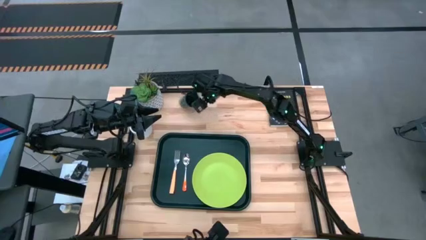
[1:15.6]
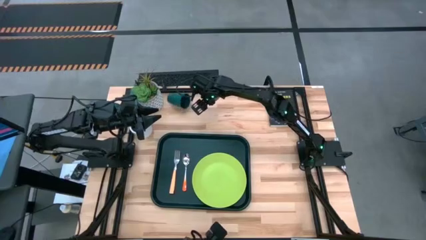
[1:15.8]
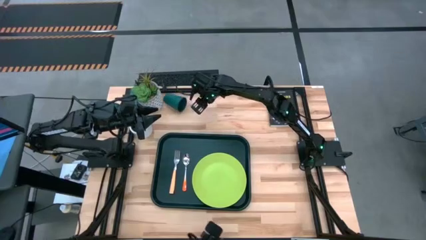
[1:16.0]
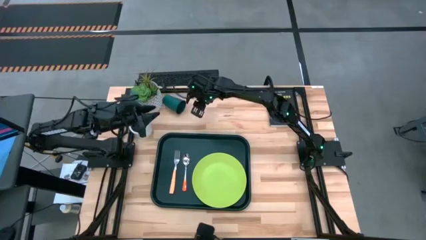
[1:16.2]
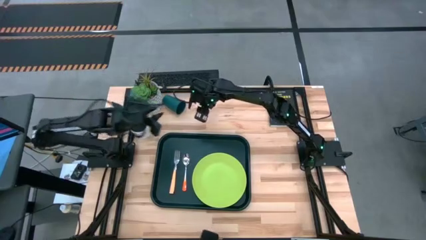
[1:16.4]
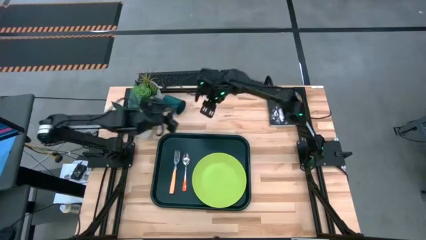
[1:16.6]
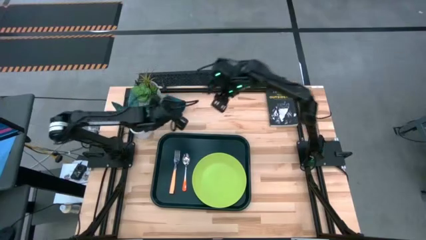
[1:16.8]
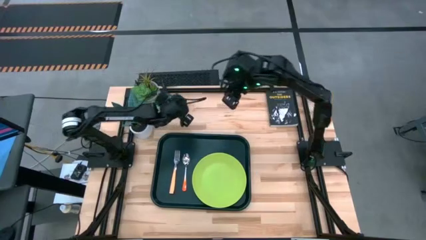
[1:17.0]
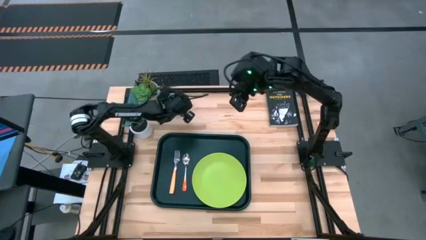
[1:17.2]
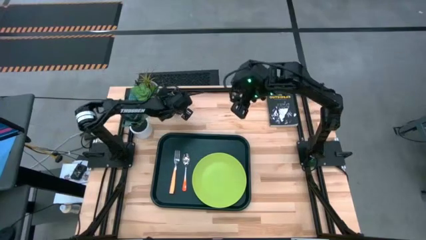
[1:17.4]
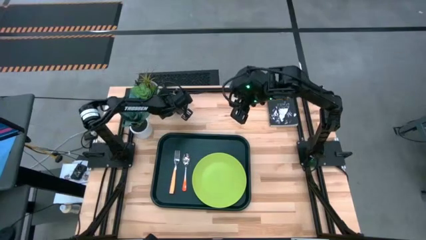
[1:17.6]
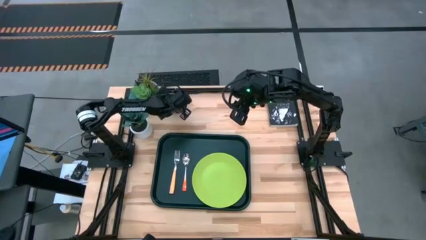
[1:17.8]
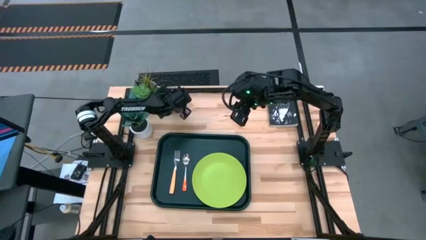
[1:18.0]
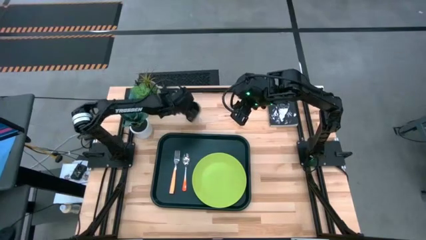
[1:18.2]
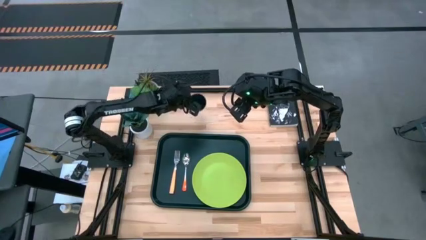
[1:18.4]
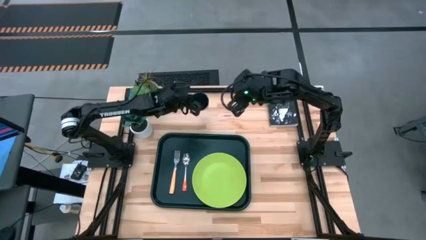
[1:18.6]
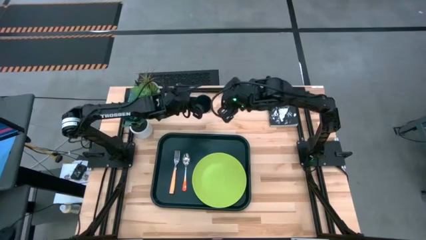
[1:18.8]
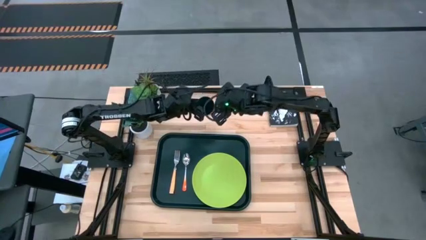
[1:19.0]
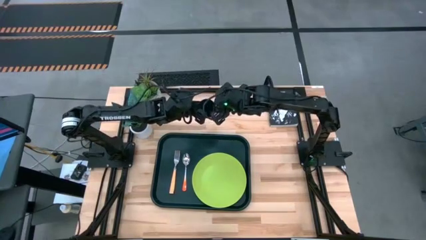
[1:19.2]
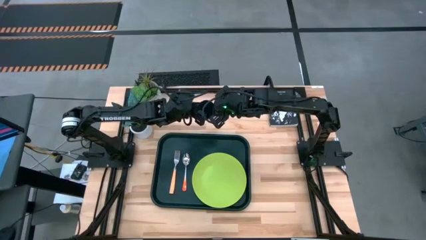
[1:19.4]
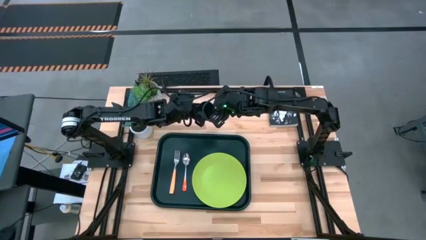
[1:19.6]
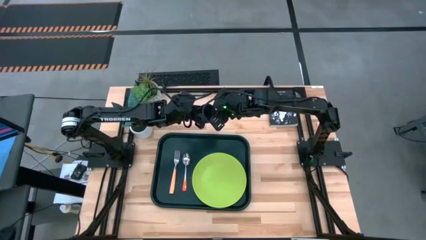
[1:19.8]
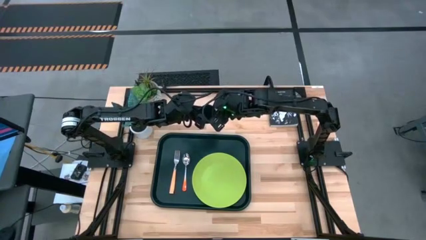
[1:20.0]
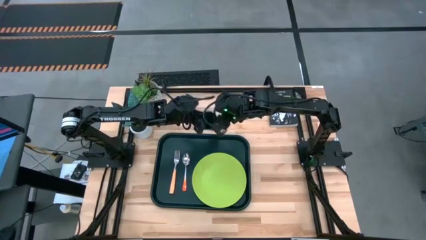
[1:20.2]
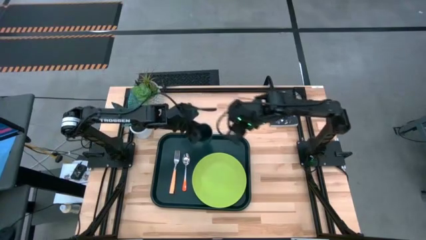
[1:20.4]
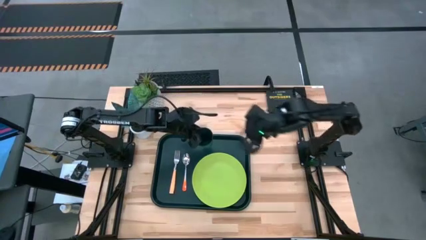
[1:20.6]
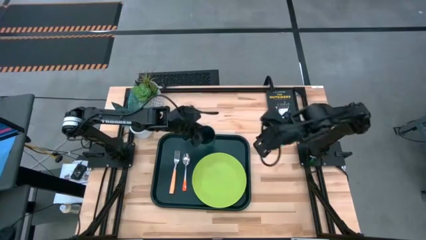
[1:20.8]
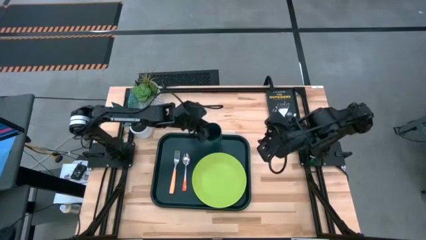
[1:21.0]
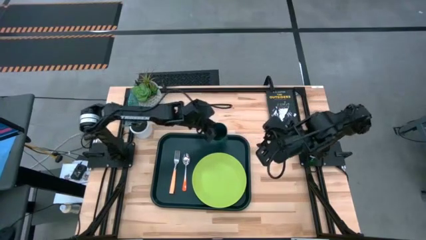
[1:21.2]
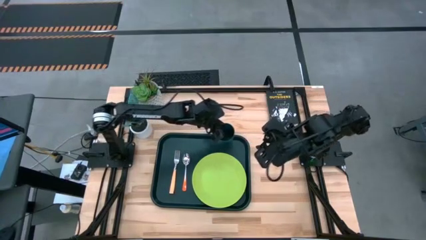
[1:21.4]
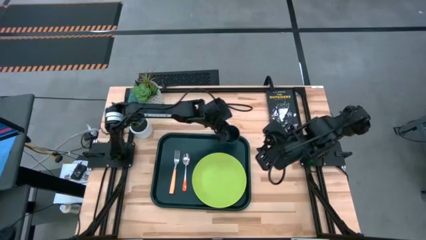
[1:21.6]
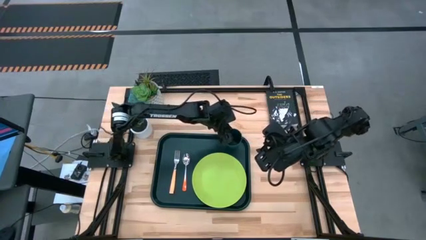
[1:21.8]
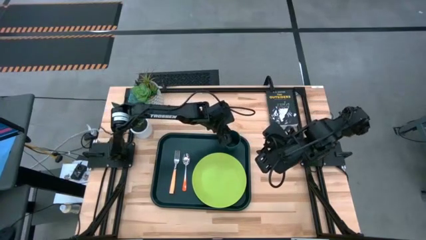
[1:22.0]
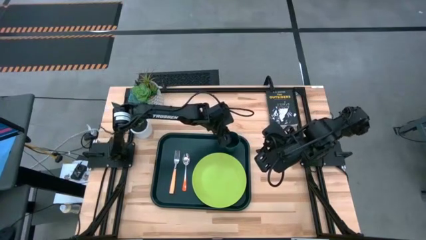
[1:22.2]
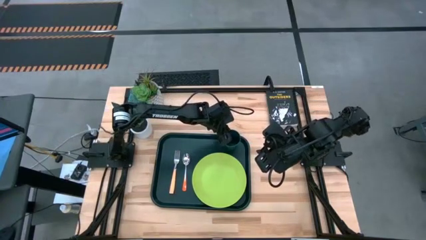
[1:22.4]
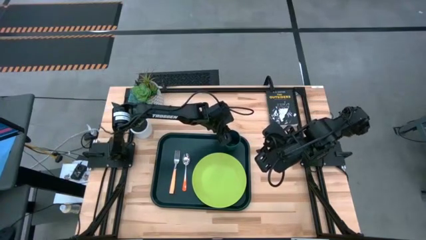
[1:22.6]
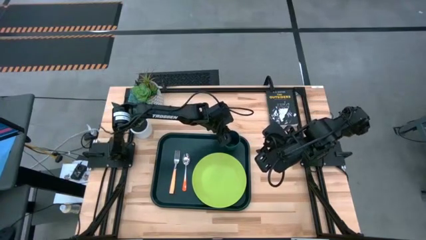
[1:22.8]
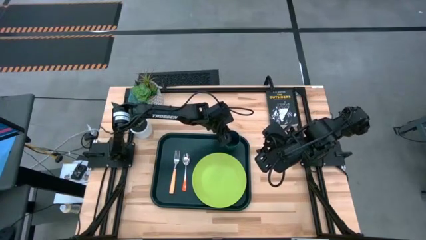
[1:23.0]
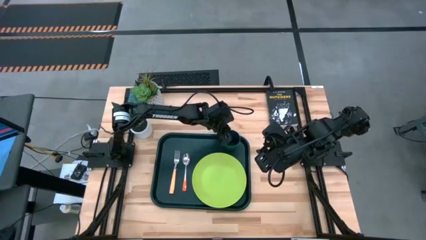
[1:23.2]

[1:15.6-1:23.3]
Task: Pick and place plate/cup/fork/spoon on tray
Put the blue cup on the black tray to the top right of the green plate

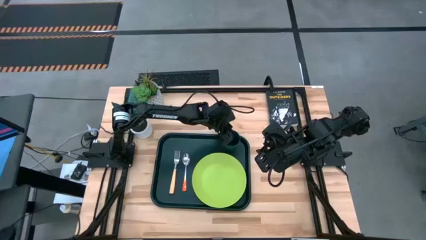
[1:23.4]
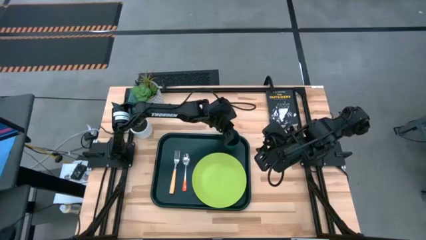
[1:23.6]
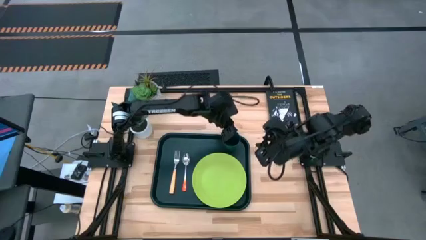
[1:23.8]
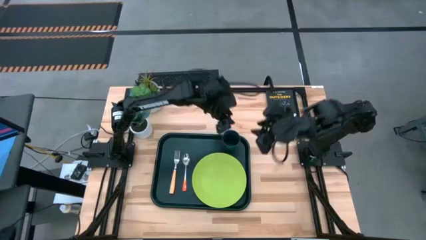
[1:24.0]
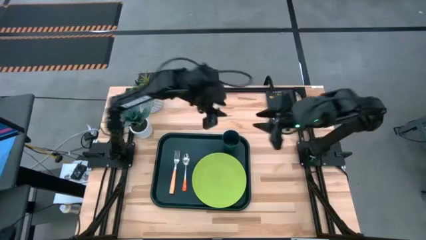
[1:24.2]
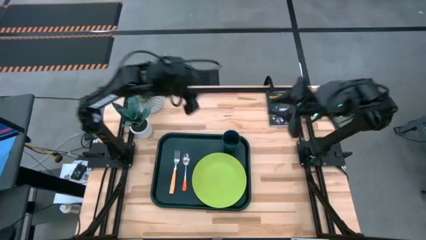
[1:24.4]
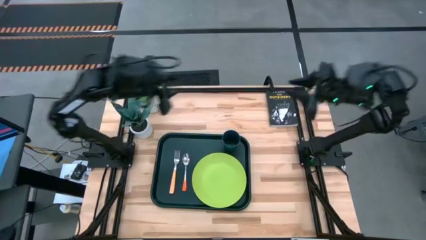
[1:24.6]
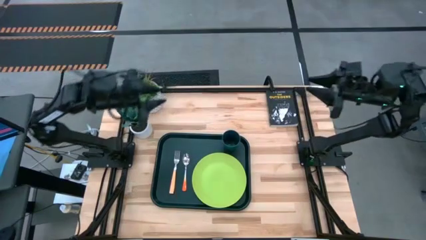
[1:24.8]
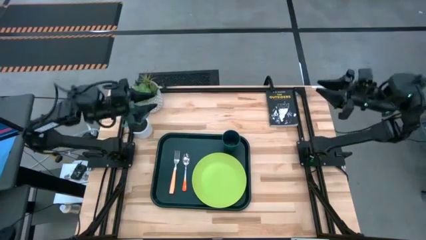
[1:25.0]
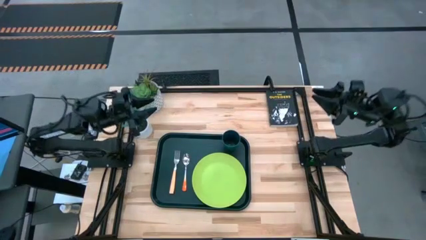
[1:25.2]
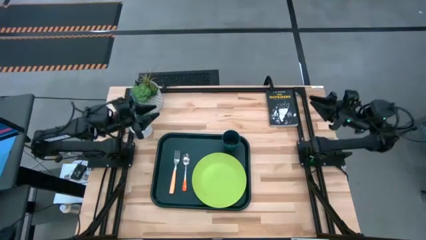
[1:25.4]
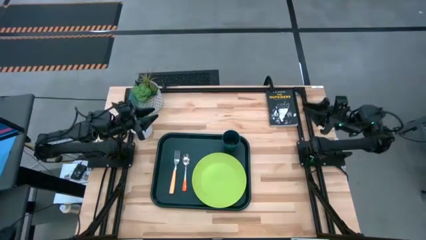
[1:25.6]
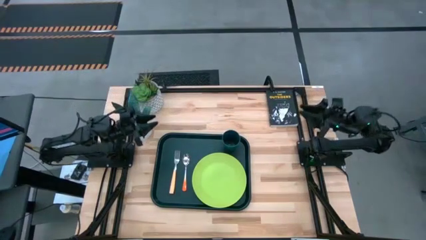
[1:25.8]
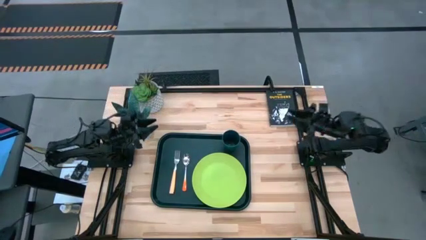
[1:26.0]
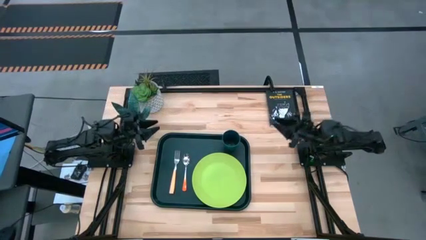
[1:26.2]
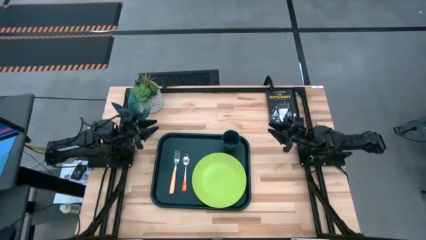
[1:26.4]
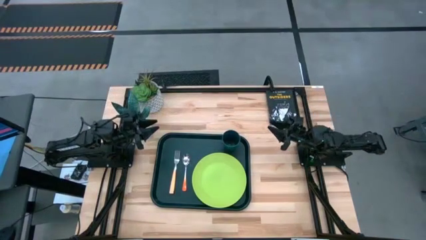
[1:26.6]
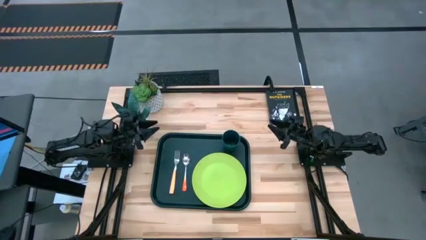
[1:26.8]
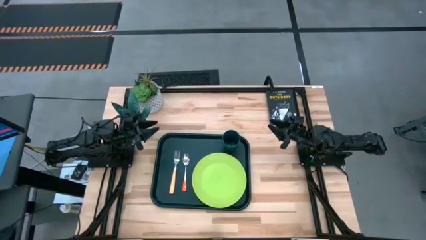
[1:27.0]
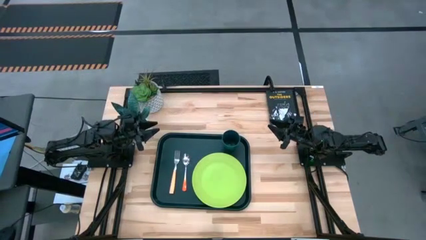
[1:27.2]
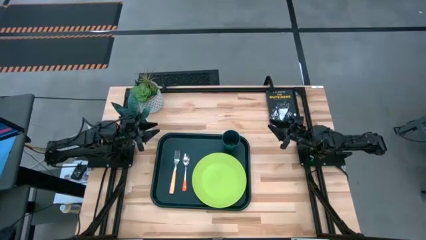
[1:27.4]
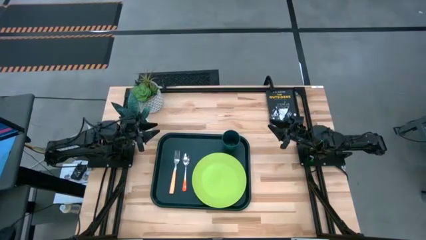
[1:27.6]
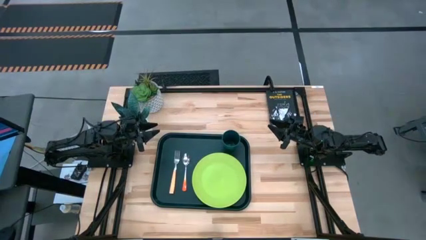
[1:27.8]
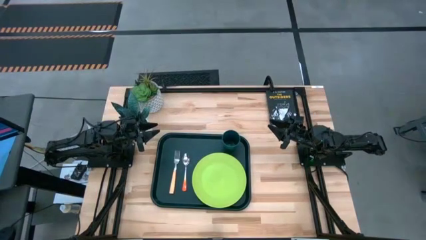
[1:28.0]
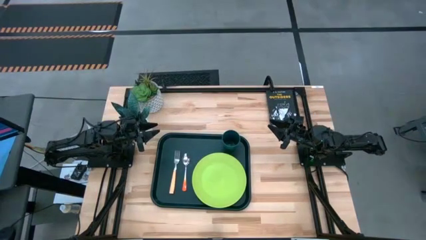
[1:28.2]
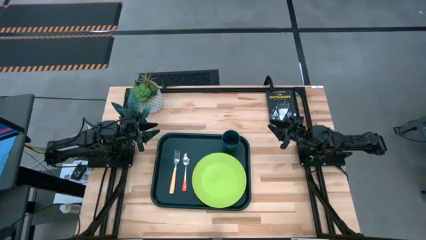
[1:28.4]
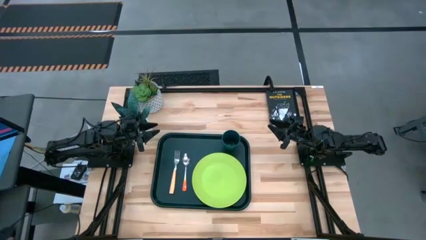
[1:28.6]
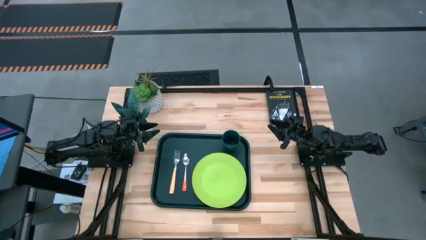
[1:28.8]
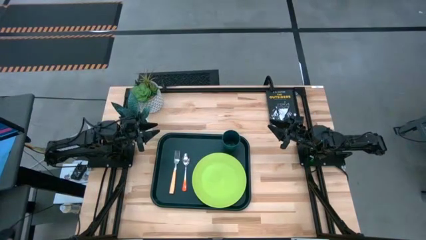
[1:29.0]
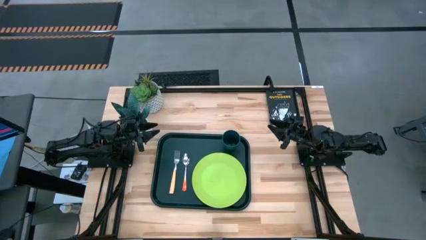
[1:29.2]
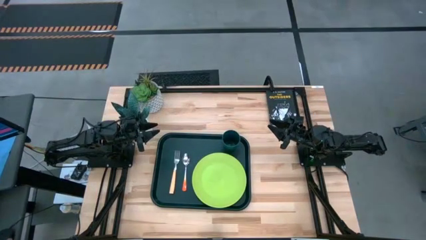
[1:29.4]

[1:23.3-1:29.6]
Return to Home Position
